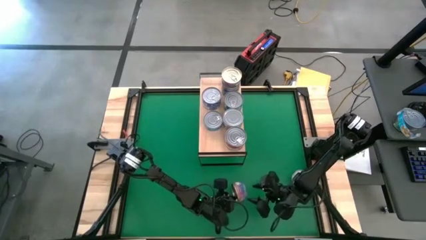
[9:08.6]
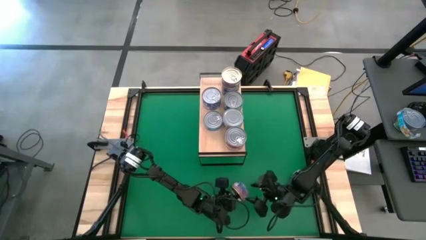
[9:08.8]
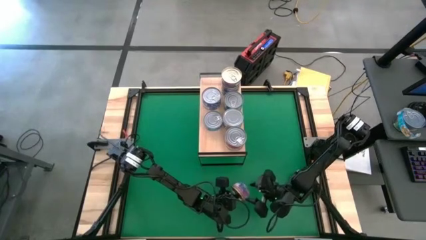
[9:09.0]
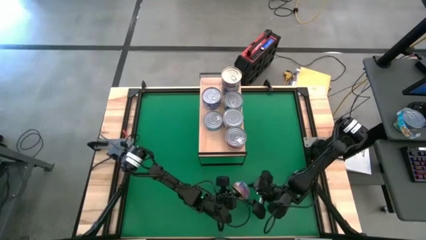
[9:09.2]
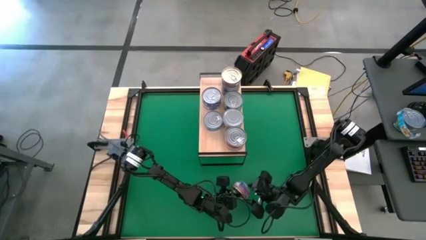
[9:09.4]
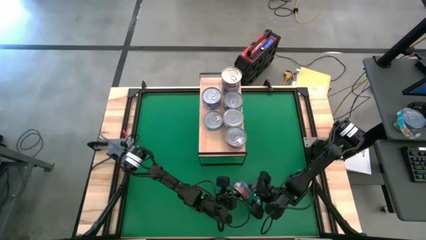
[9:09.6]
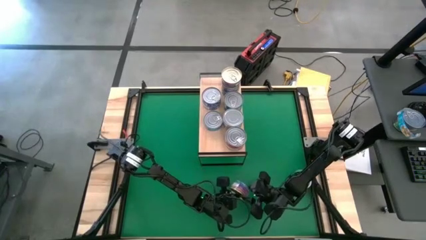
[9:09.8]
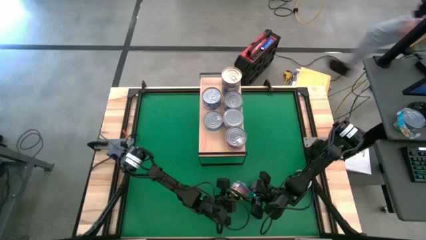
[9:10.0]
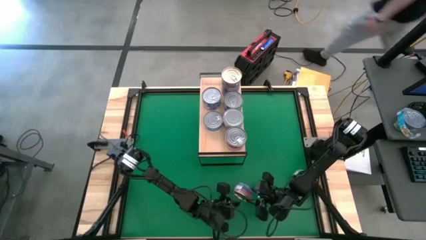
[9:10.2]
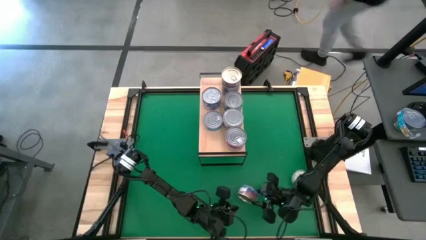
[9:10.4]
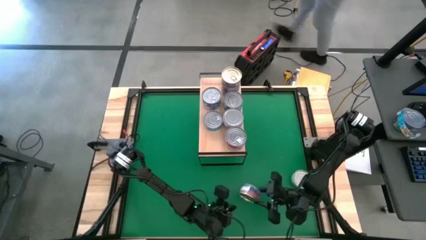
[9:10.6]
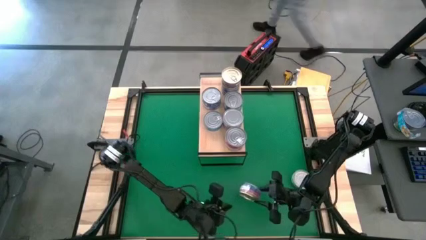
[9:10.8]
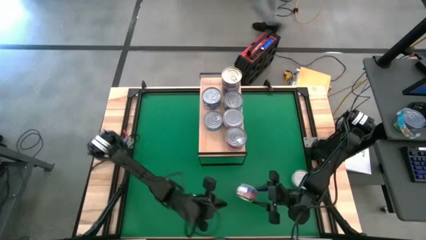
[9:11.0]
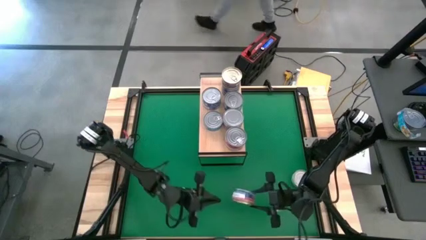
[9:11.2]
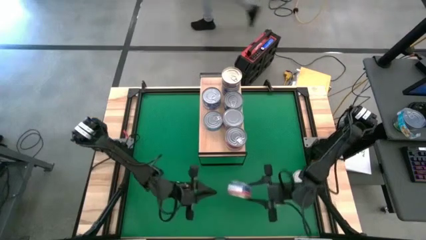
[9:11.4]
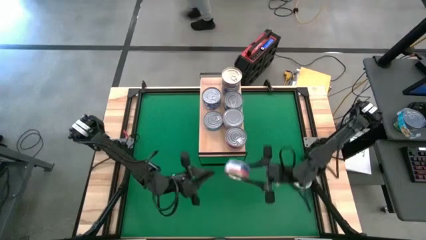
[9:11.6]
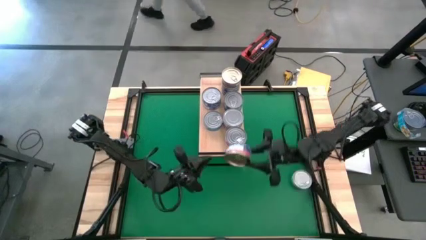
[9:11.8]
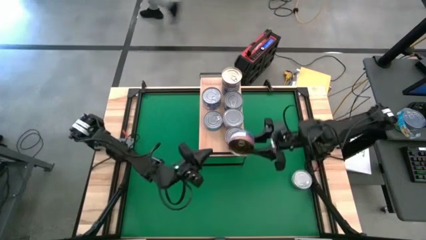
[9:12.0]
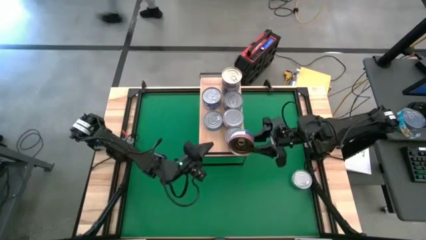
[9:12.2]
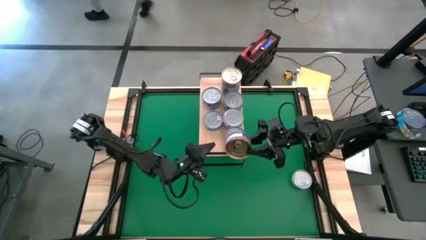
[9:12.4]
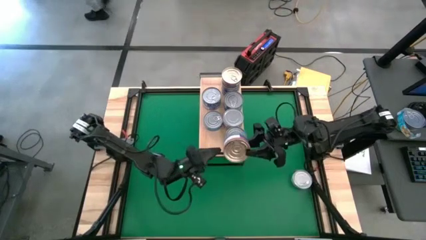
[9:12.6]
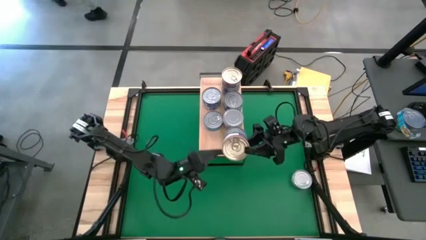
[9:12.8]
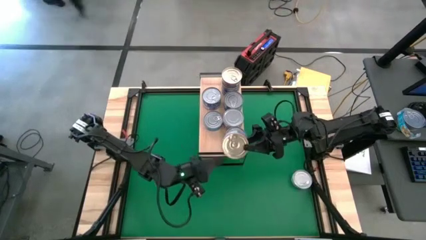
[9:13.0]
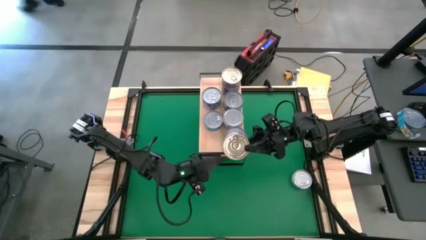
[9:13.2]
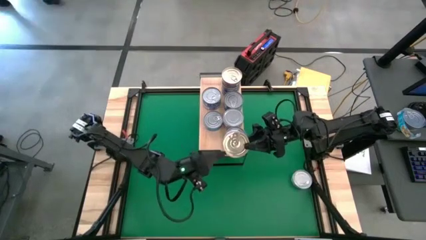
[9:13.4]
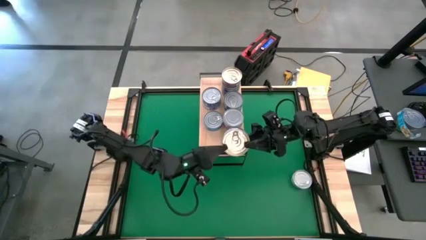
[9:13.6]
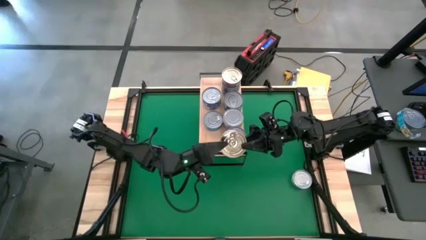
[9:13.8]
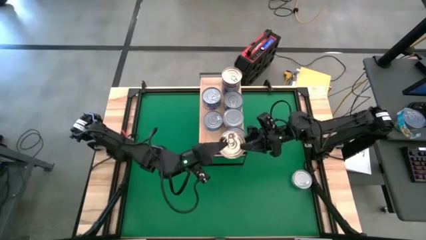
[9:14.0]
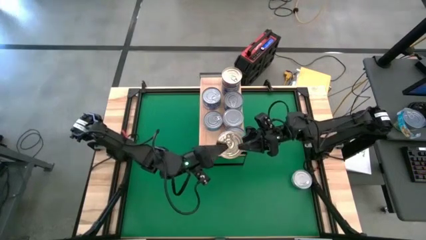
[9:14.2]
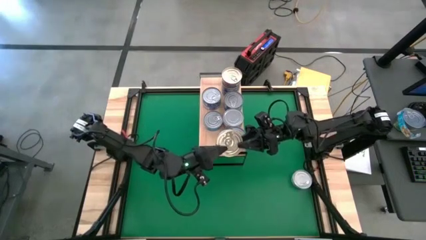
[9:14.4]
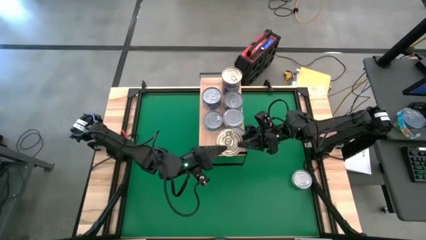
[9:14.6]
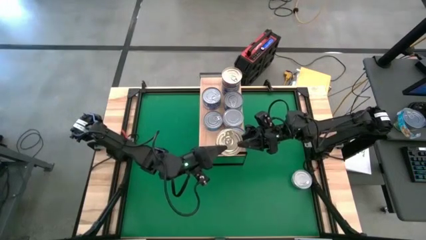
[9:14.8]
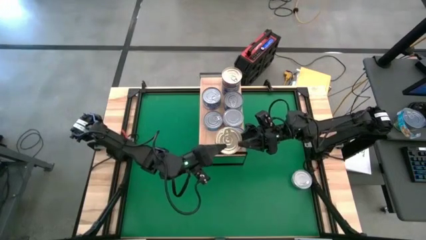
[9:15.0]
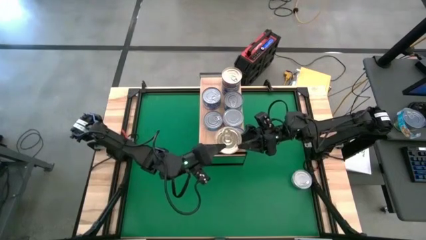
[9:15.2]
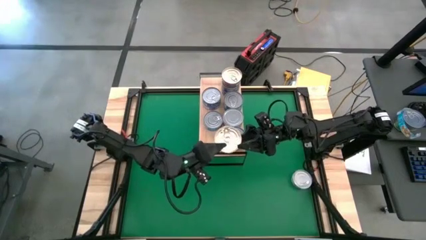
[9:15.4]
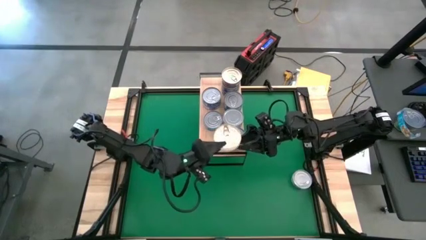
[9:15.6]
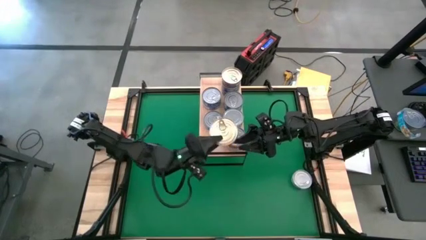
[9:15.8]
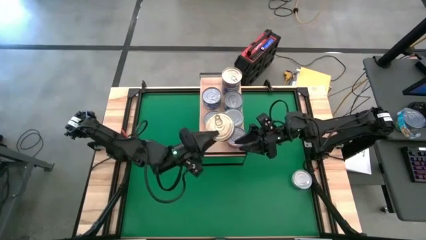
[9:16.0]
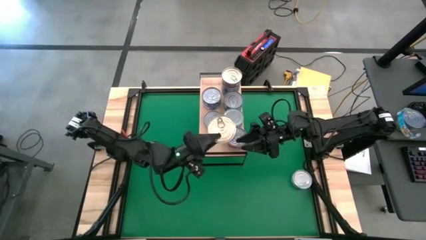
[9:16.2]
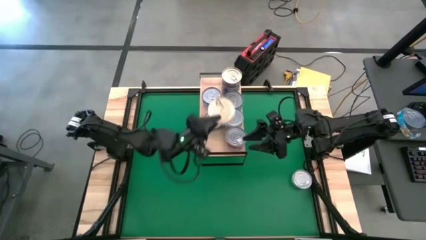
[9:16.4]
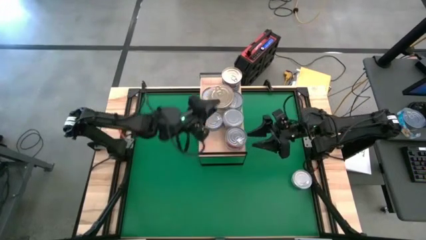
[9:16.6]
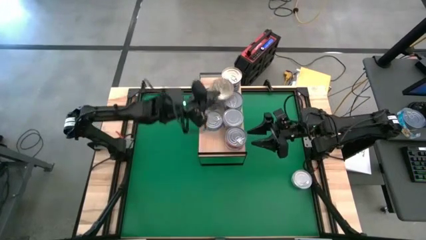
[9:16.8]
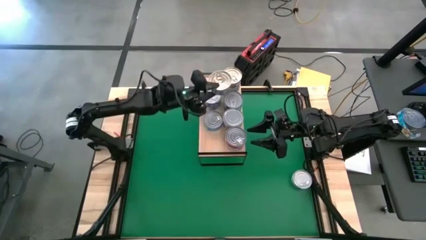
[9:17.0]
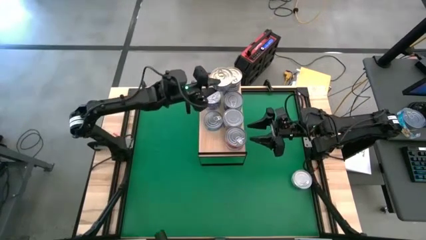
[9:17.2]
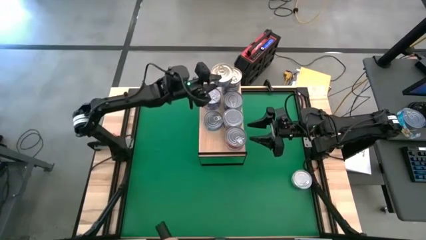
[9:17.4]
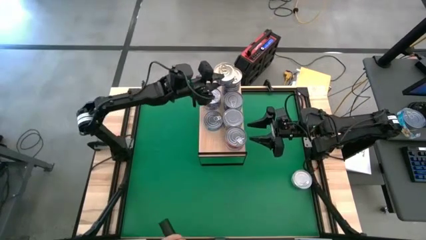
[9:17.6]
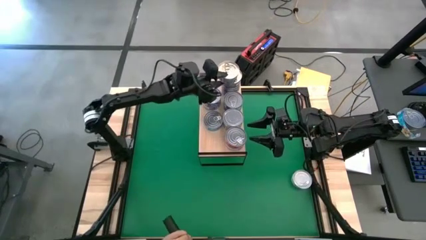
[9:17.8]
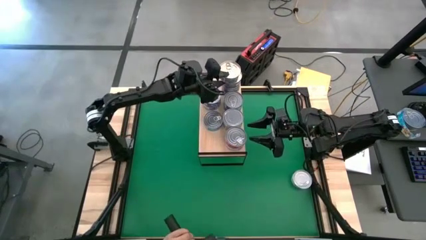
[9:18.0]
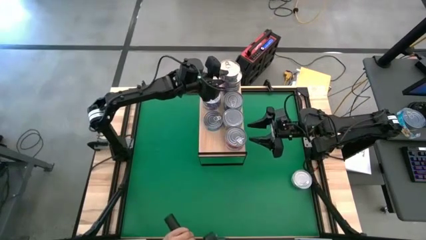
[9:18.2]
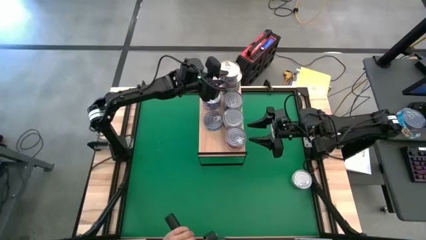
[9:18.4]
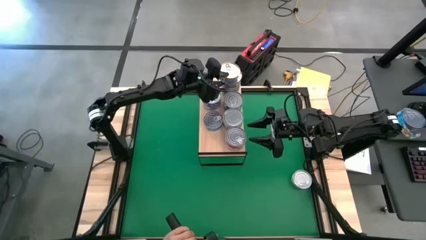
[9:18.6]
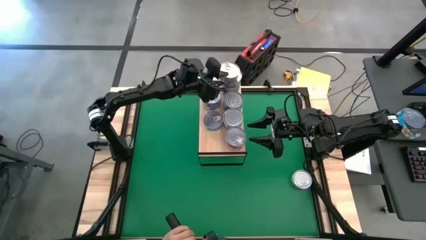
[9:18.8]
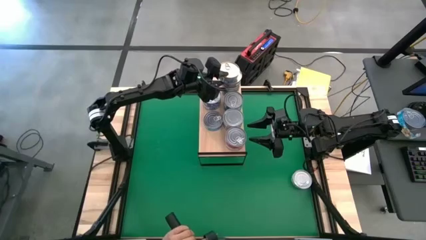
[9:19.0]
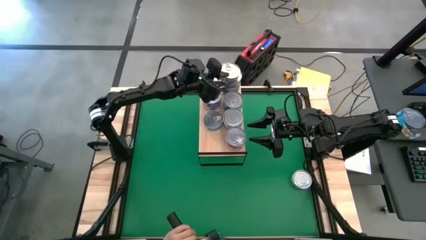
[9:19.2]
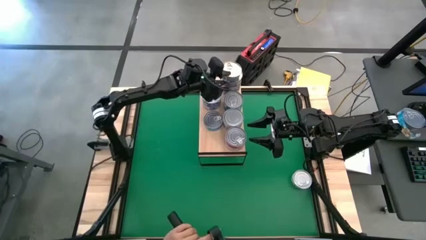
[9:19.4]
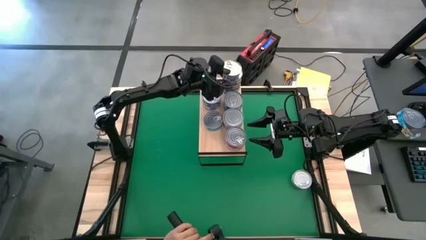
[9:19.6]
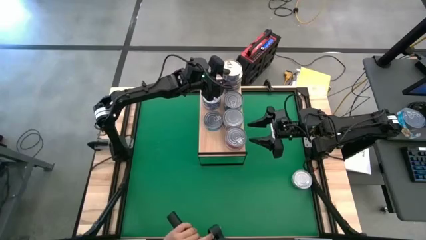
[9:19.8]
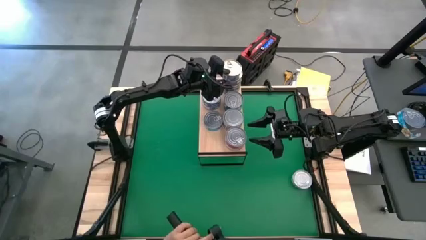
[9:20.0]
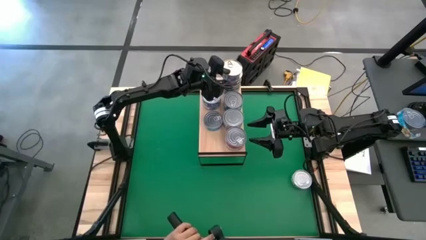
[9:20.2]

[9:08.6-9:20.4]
Task: Stack canned seafood by type on shelf
Stack the dark blue tuna can on top of the dark blue can on the shelf
